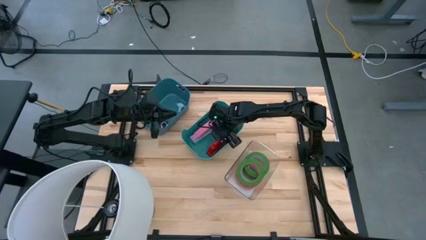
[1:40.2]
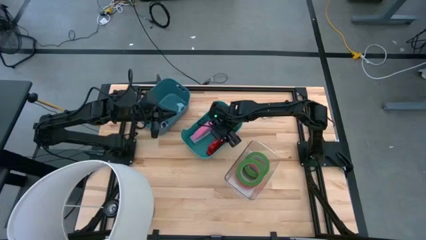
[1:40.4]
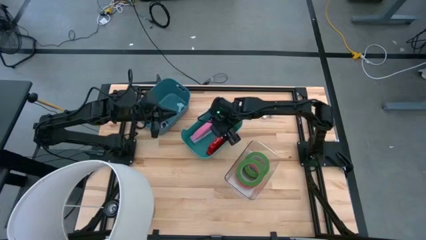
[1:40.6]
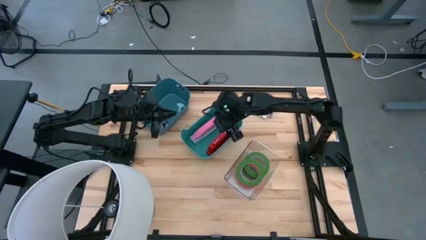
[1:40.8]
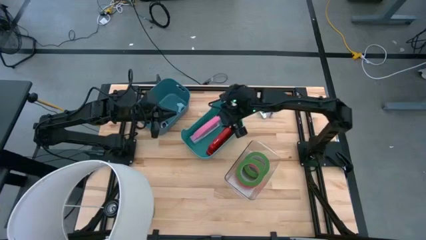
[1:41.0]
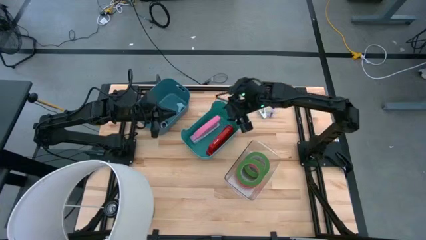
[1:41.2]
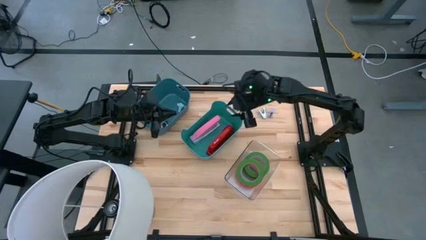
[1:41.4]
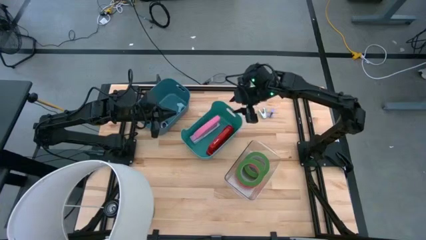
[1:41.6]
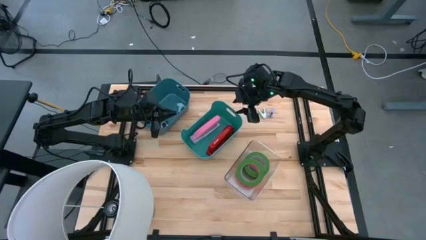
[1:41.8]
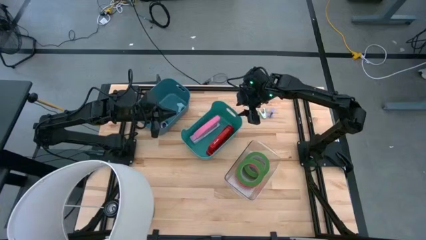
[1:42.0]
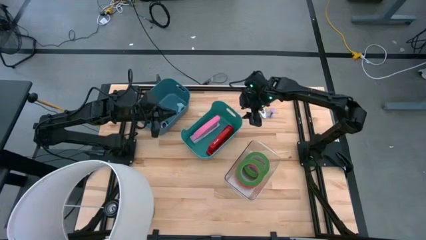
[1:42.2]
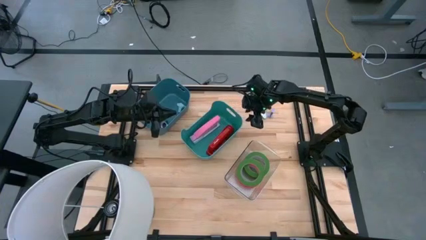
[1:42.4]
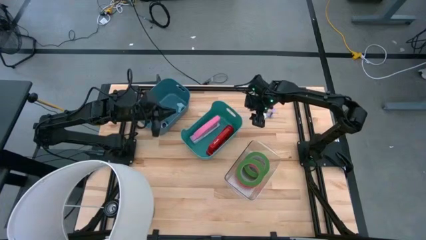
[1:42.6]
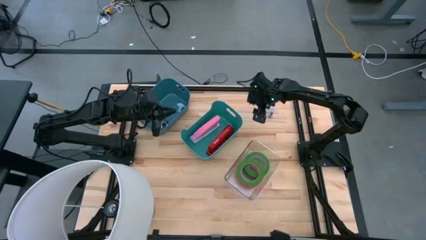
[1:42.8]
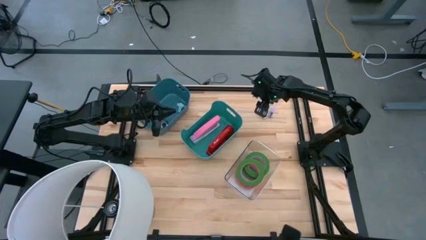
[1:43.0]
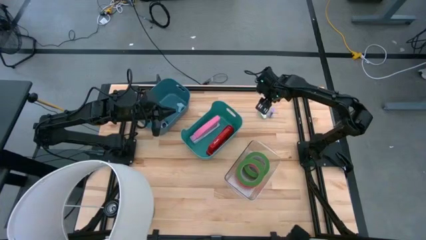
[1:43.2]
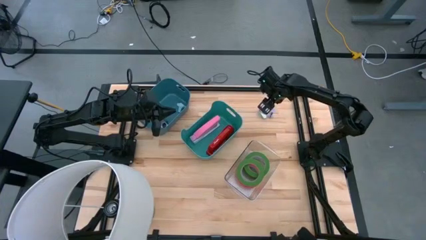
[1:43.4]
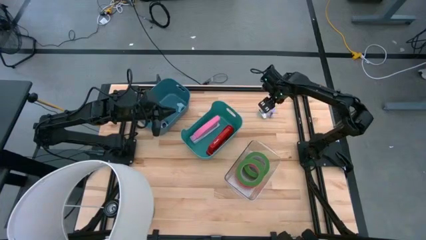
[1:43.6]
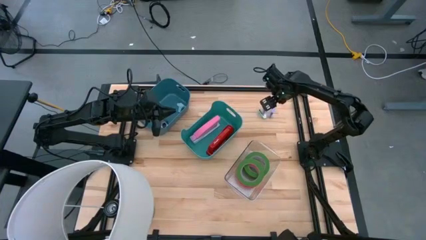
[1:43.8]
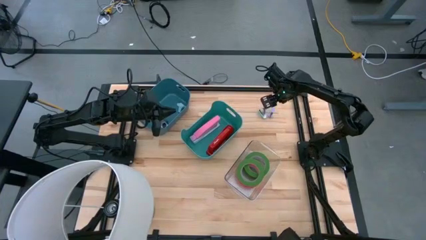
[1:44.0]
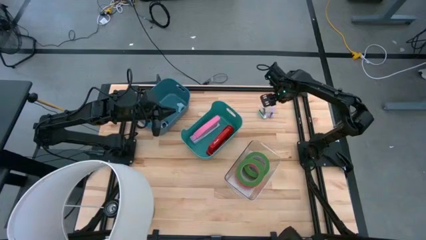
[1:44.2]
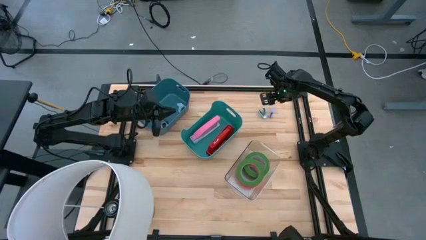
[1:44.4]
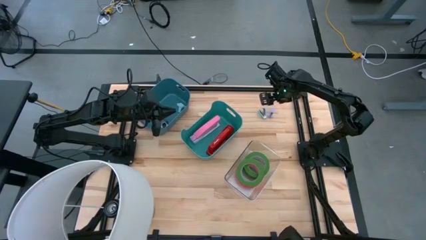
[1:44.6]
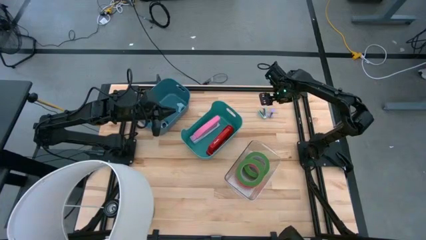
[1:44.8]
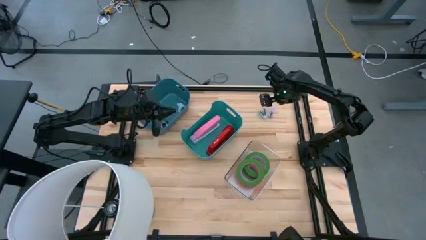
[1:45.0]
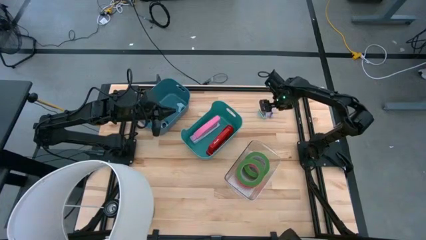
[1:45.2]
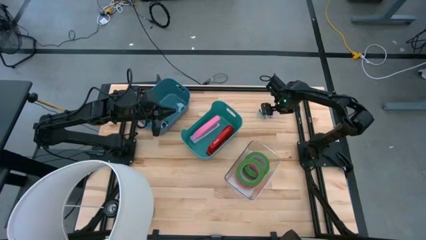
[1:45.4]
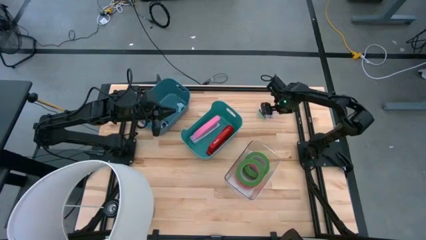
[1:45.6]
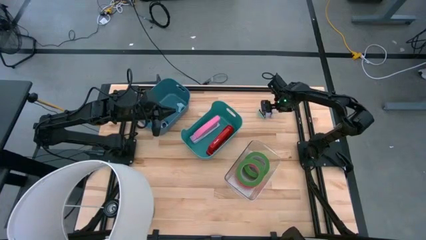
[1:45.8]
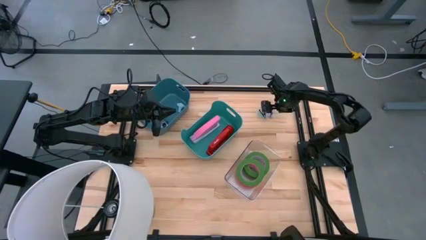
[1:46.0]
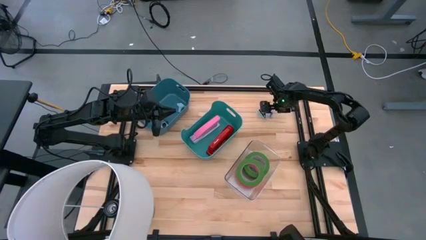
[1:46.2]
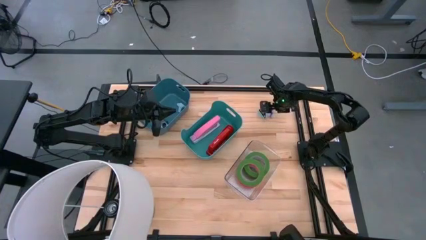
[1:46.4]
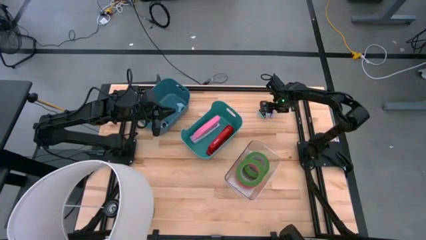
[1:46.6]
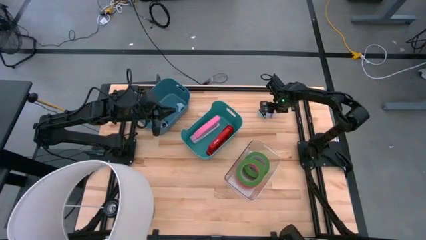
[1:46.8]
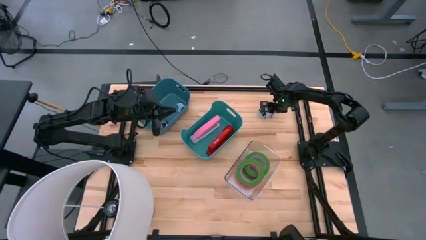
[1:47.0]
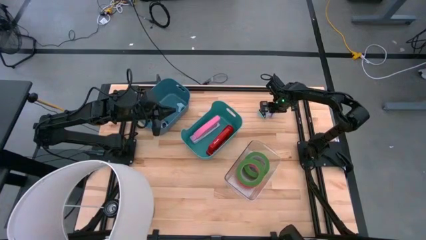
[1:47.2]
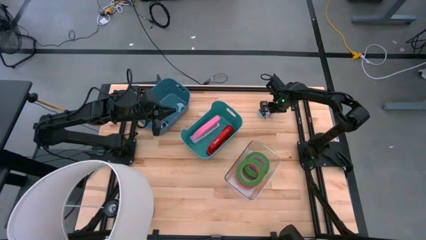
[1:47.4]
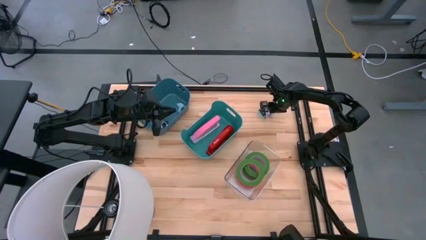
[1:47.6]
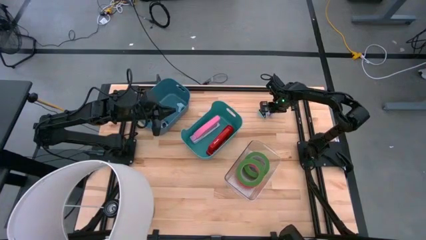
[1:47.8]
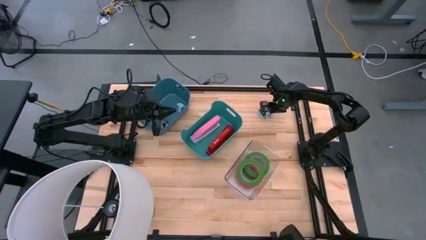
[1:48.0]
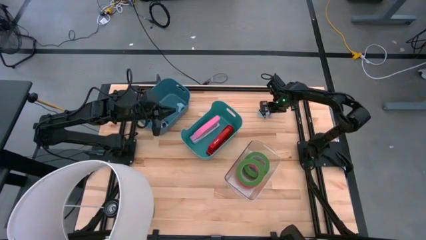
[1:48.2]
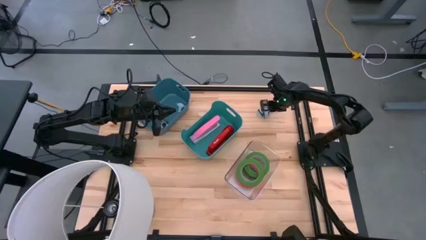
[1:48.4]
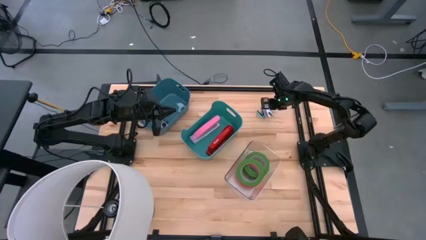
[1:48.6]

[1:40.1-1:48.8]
Task: Pick and place Stapler, Stapler remover, tape
Put the violet staple remover into the blue bin

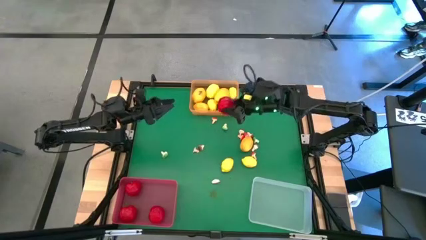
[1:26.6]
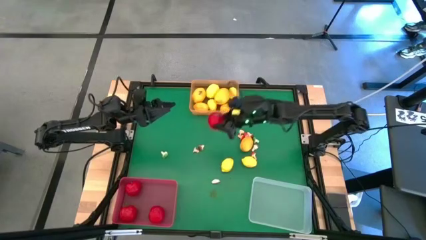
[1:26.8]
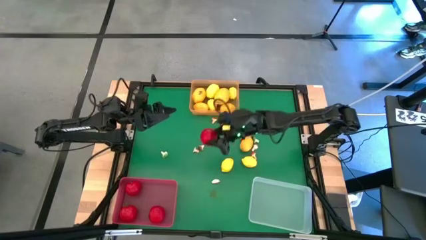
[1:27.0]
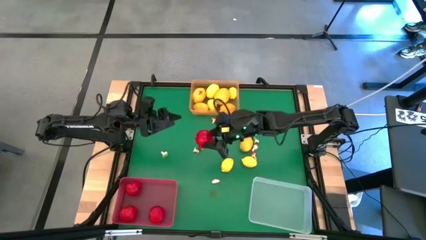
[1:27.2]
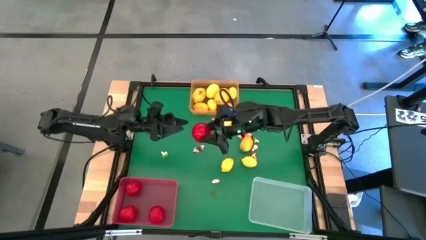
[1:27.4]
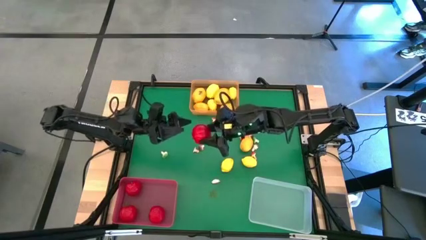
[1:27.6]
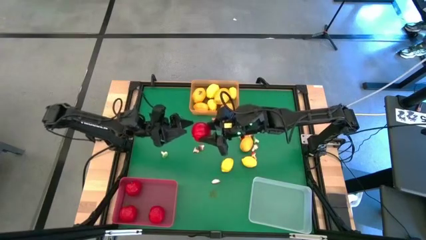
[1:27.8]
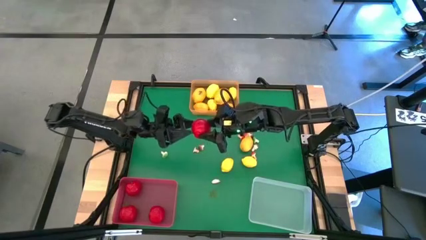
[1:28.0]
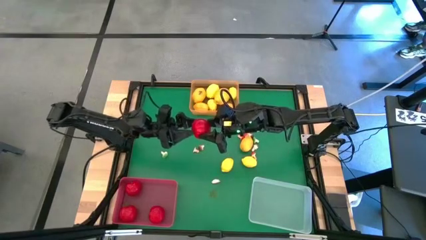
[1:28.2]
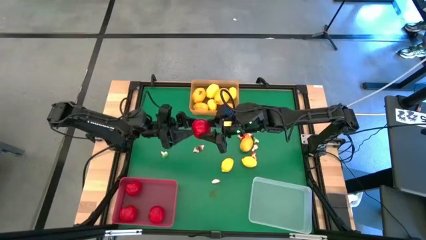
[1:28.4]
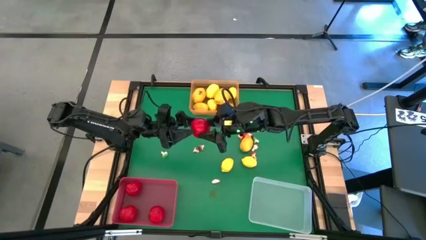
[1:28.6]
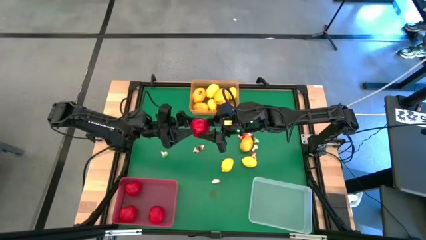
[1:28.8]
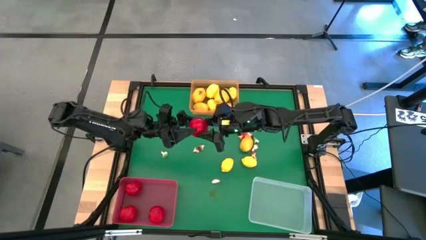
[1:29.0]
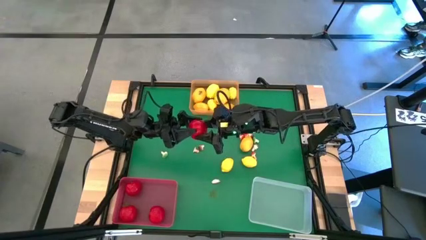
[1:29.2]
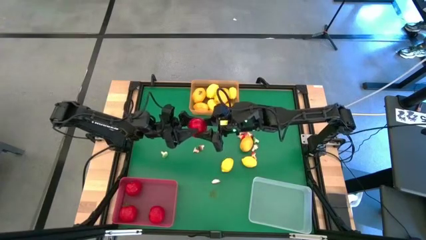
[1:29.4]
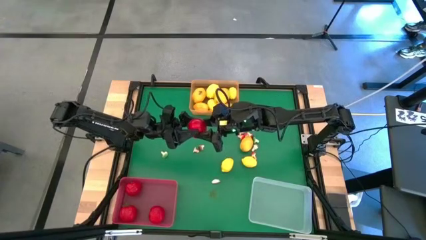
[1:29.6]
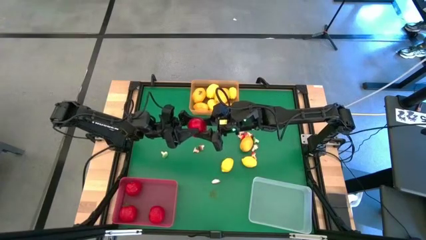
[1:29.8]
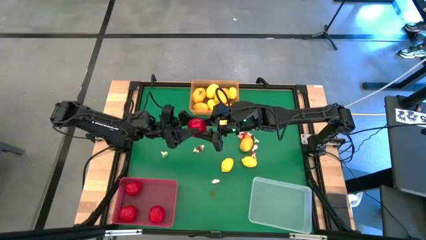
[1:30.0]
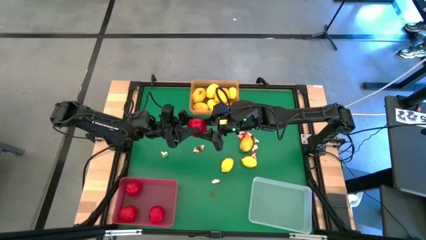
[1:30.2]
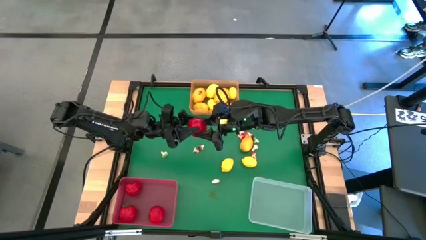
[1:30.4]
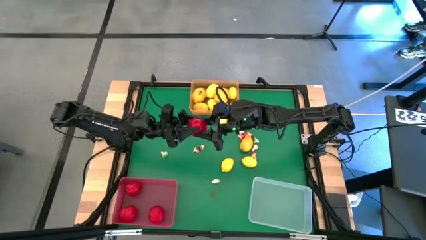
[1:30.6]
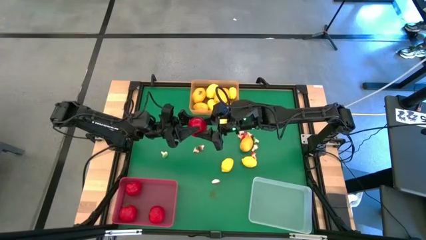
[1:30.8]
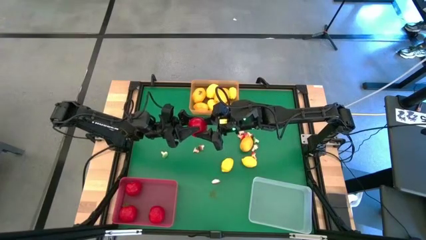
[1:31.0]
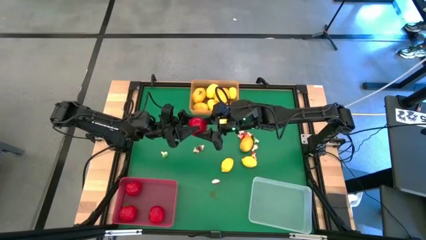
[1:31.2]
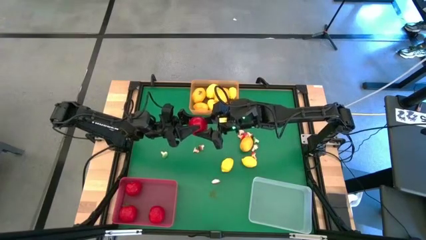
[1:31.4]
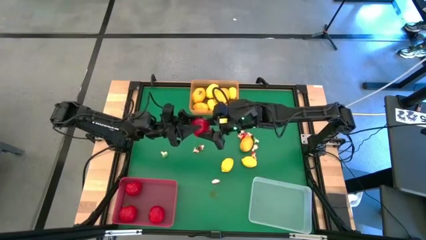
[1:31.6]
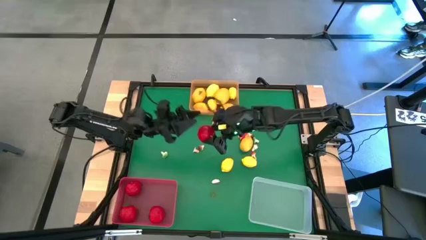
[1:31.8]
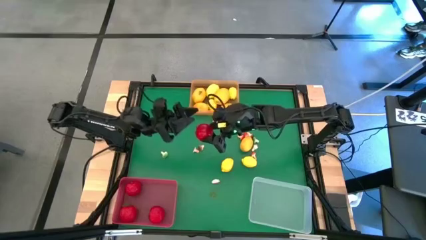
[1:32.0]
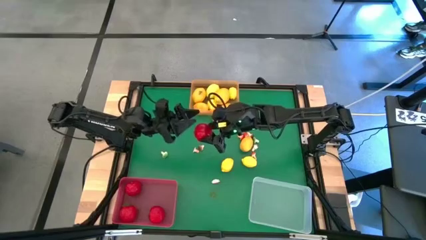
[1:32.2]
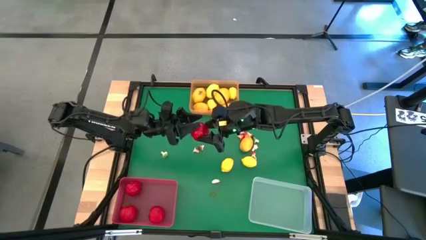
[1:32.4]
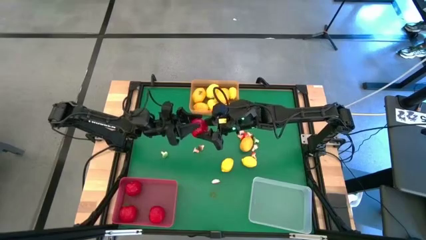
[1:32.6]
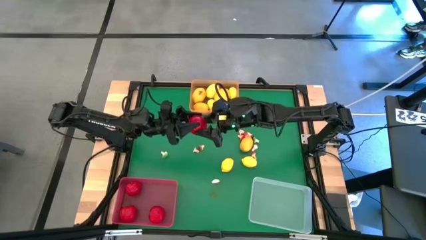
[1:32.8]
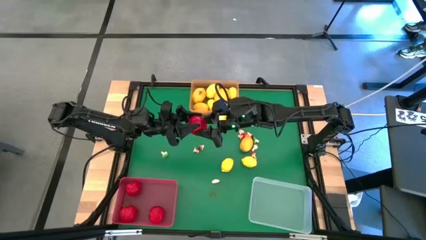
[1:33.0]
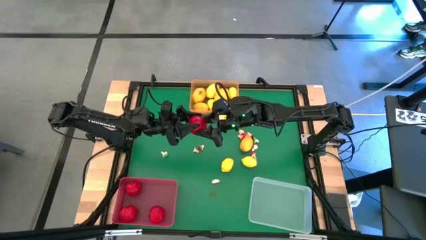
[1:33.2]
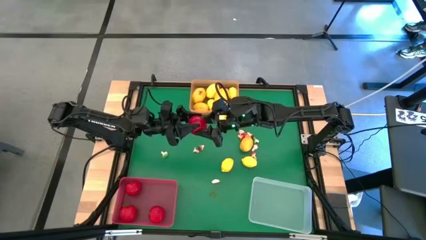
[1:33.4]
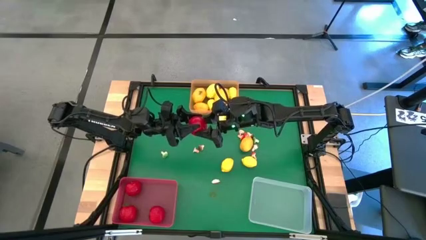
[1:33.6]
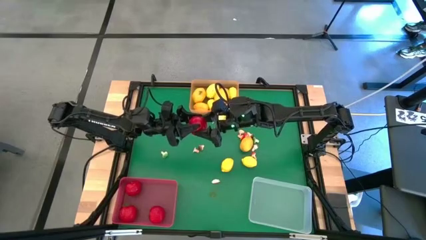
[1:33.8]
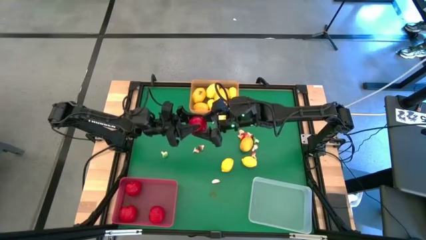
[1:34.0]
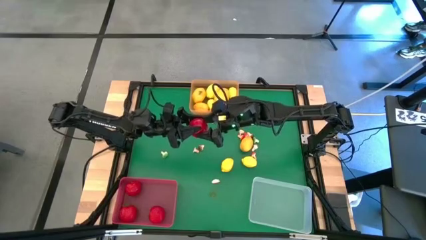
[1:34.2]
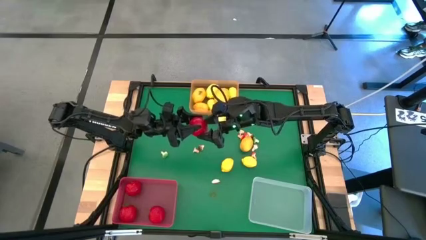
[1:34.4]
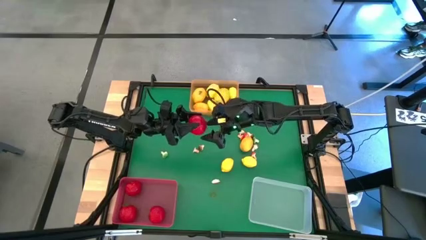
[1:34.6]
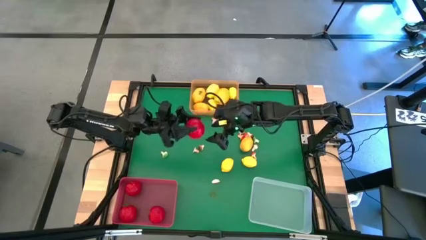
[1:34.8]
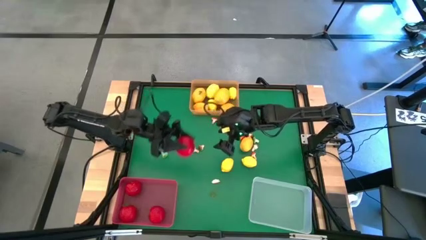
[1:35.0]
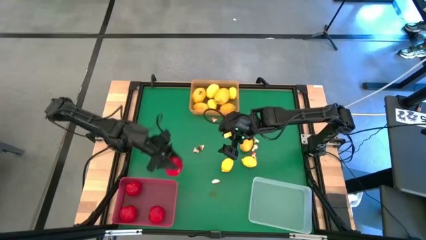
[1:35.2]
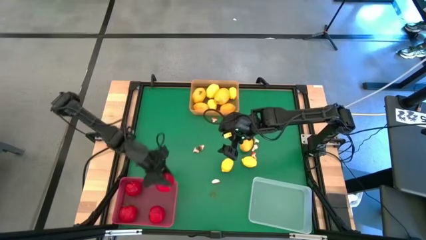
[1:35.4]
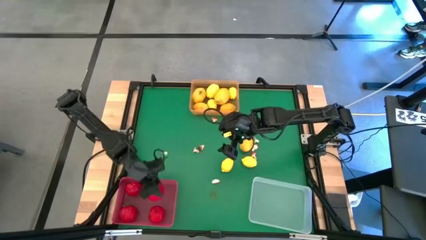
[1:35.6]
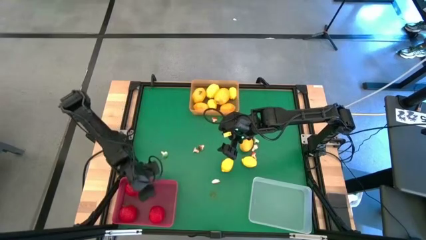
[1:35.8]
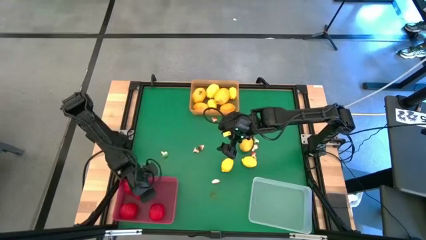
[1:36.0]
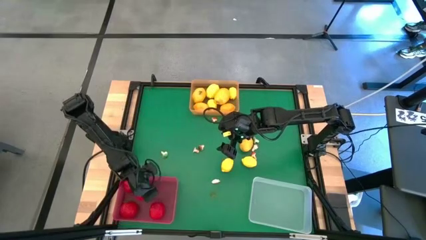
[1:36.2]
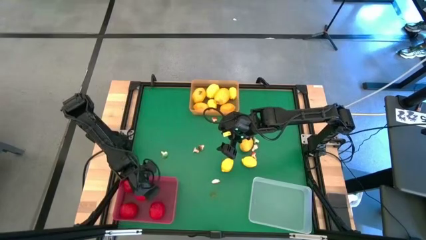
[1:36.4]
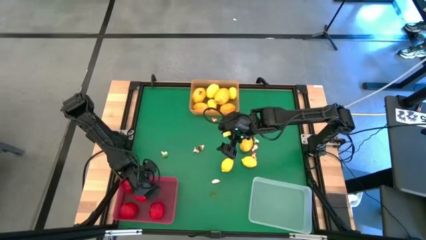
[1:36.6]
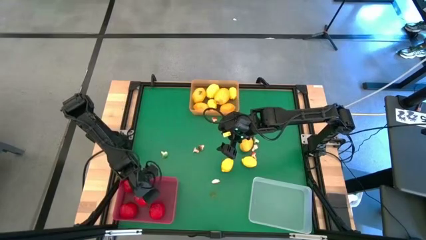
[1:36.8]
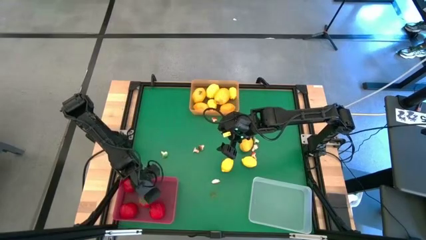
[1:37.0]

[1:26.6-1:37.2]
Task: Sort produce into baskets
Put the tomato into the red bin
